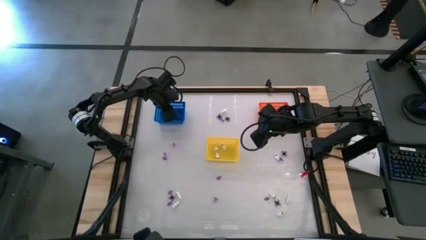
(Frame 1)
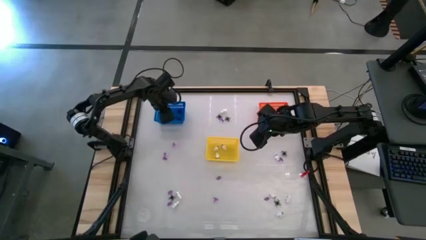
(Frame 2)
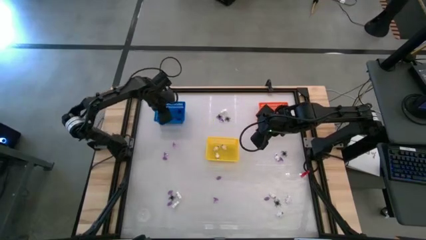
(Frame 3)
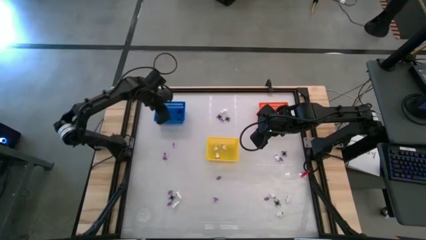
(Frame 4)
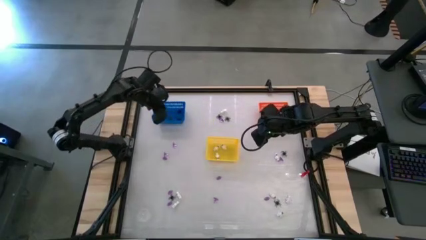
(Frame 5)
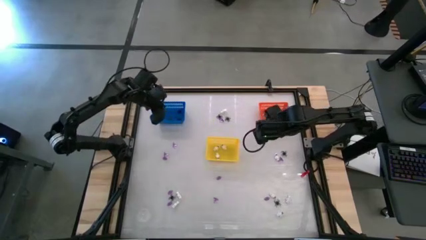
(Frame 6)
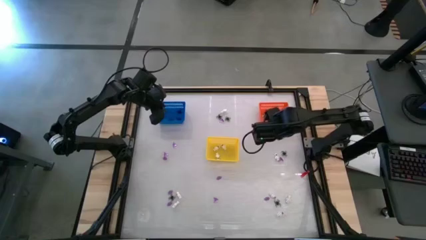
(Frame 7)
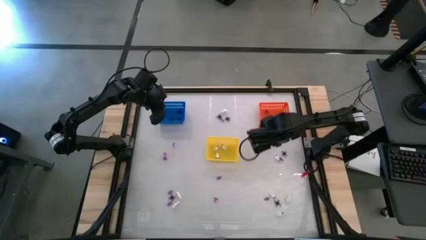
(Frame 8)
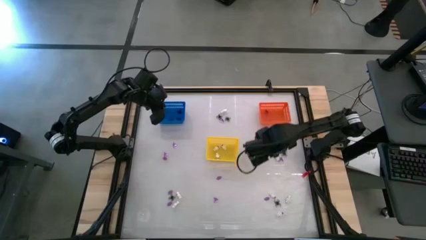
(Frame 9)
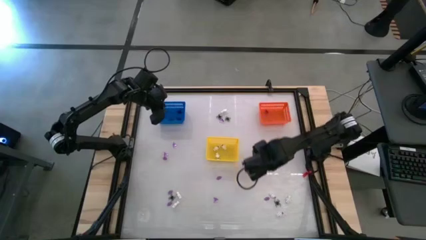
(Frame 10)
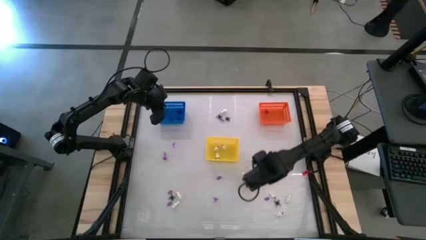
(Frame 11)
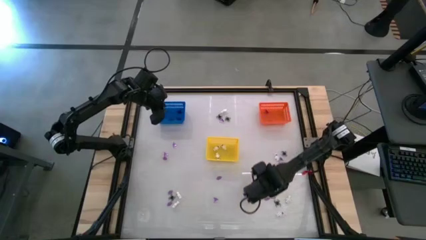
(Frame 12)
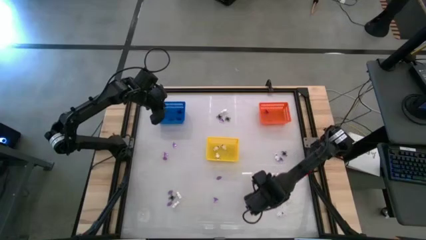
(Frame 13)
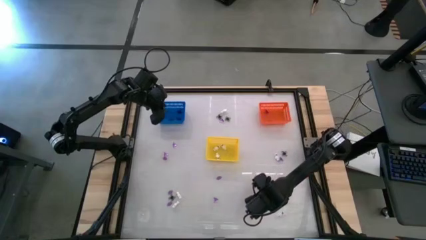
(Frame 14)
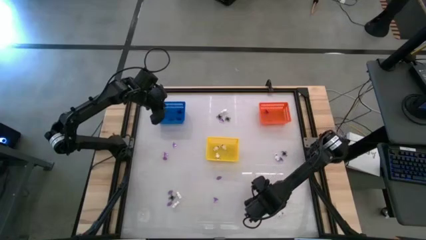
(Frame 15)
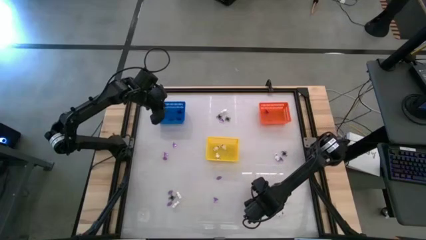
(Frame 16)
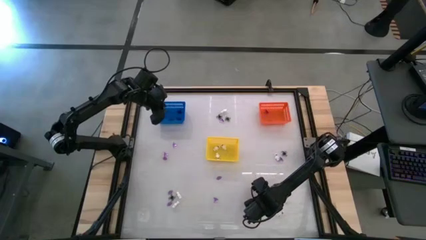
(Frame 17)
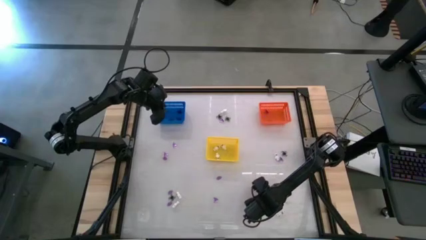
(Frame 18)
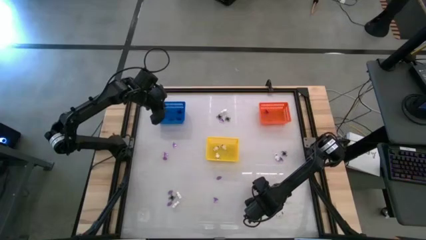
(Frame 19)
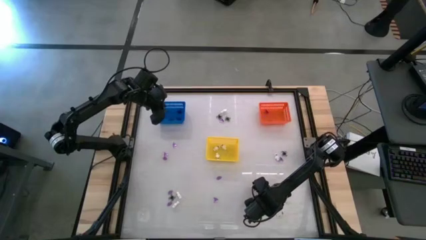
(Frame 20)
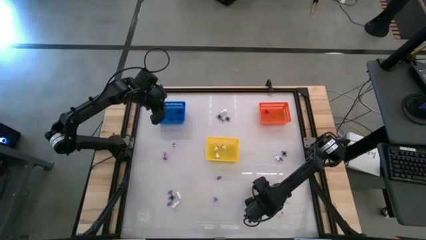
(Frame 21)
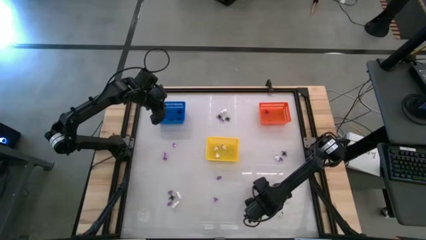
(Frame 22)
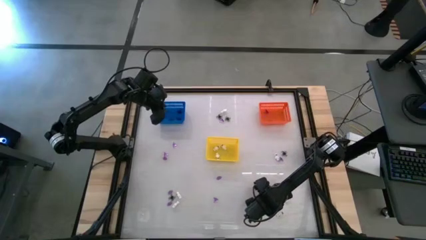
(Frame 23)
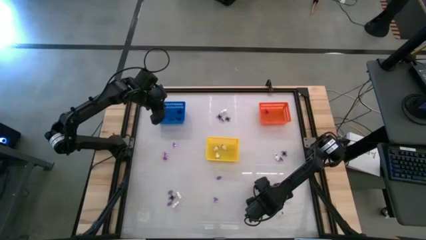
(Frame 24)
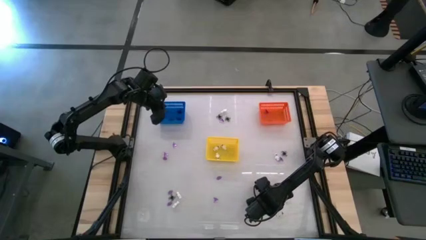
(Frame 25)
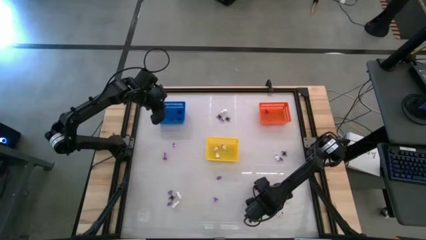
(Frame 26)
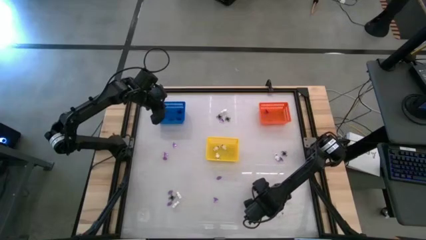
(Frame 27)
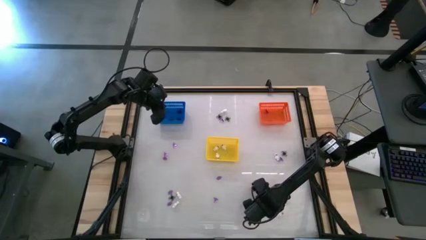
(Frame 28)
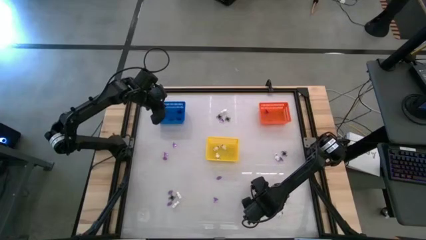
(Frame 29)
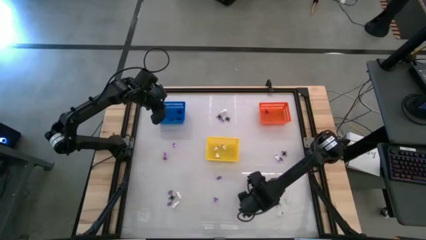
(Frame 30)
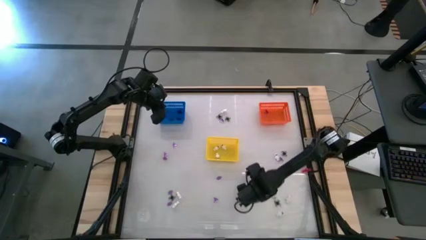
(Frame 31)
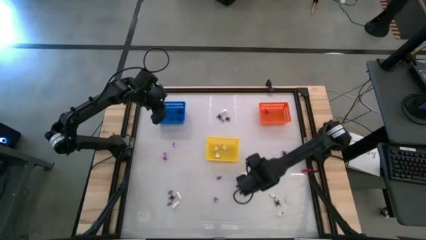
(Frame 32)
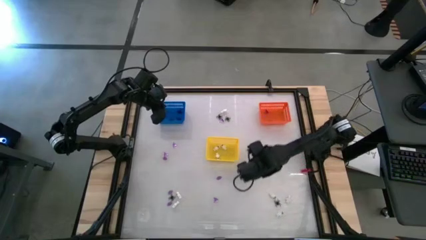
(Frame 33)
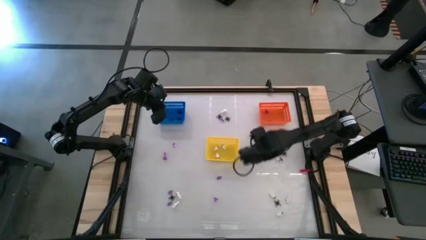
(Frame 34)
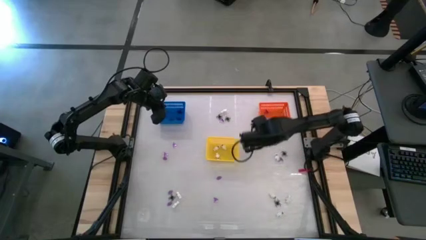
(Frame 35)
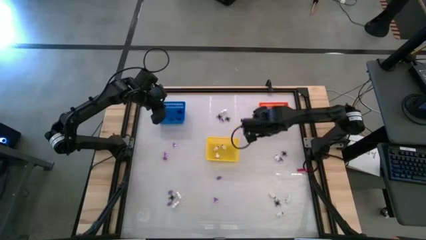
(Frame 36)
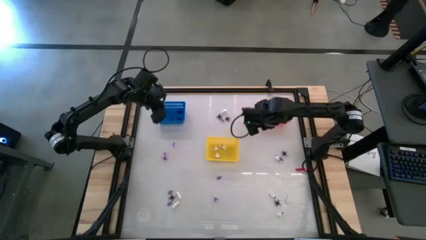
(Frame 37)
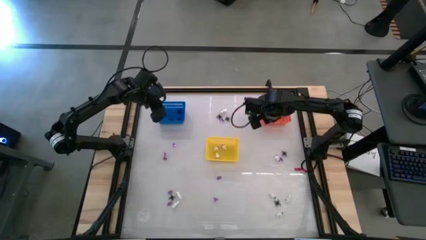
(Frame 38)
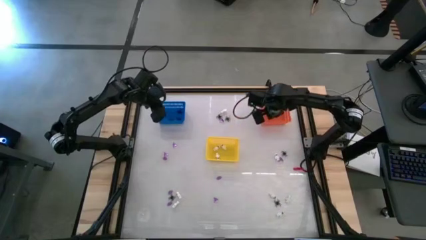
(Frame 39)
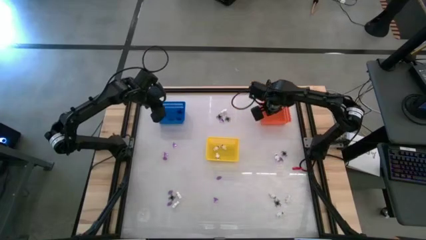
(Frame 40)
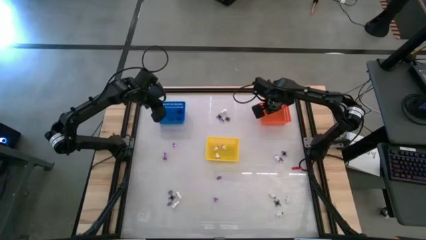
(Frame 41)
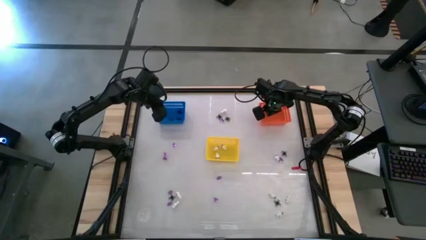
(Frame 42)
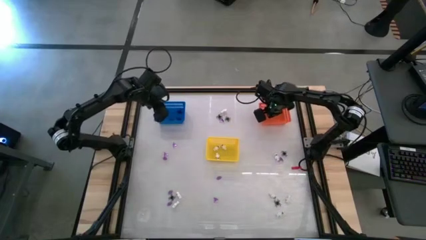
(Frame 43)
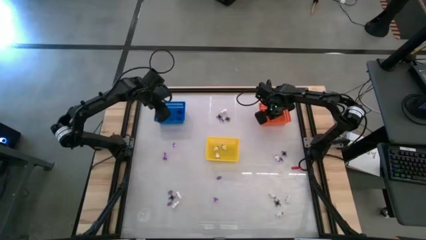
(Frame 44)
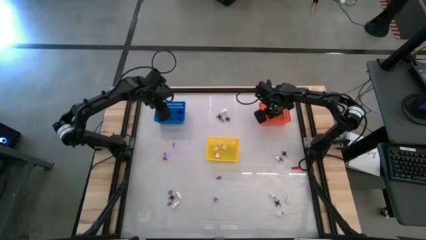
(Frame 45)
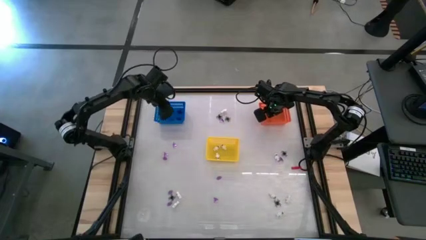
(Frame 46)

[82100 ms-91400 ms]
Task: Sort Halloween decoration
Put the purple witch hat toy into the orange bin

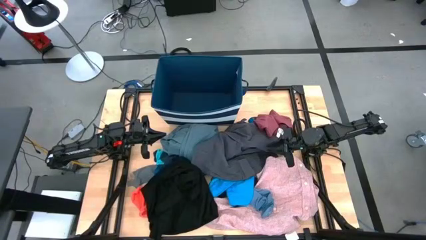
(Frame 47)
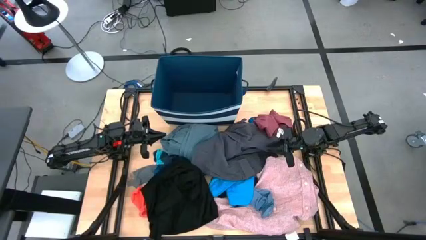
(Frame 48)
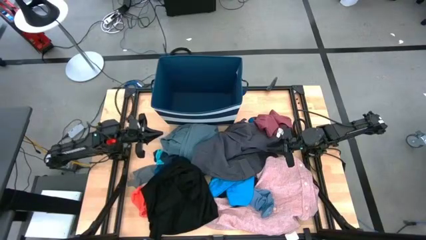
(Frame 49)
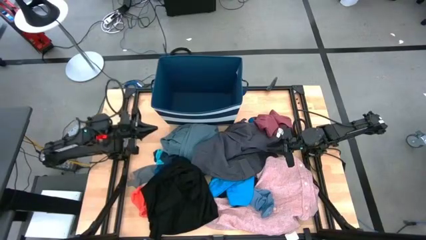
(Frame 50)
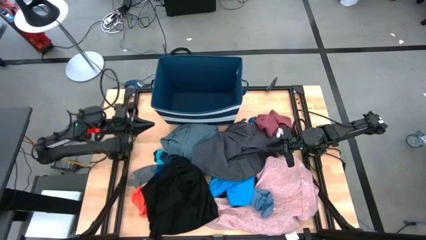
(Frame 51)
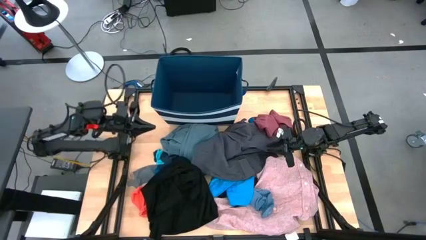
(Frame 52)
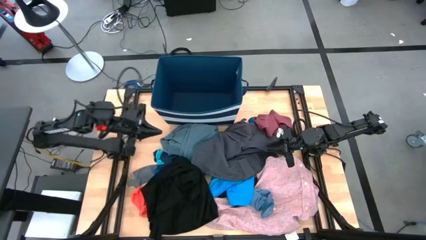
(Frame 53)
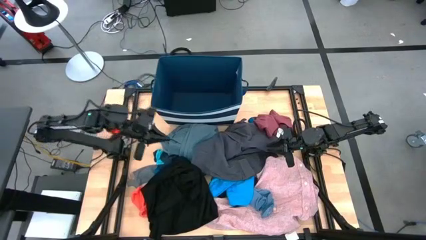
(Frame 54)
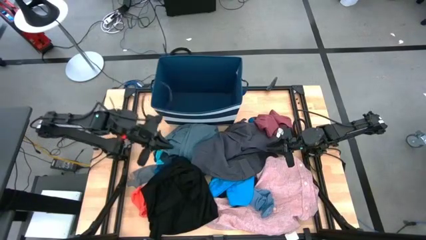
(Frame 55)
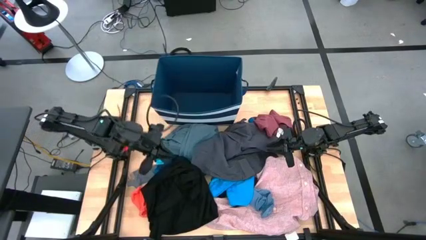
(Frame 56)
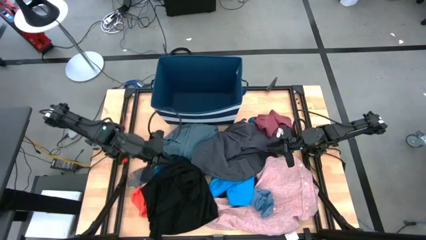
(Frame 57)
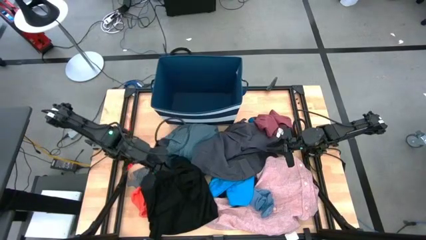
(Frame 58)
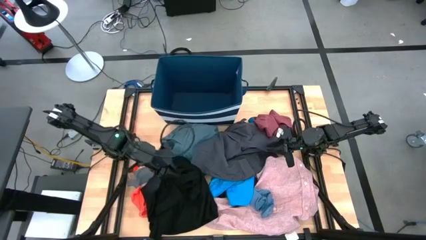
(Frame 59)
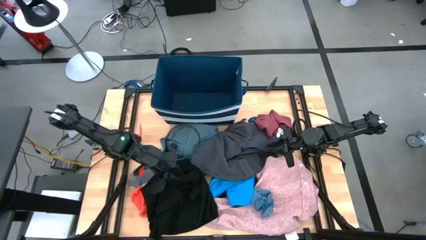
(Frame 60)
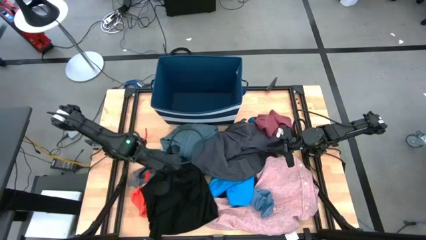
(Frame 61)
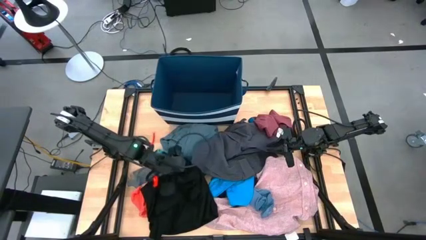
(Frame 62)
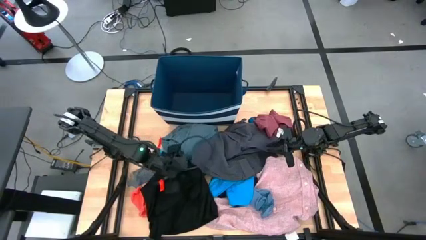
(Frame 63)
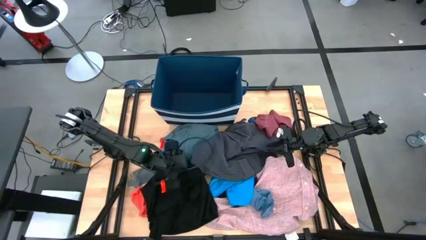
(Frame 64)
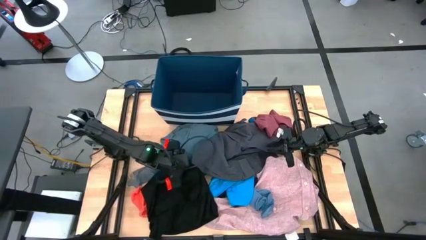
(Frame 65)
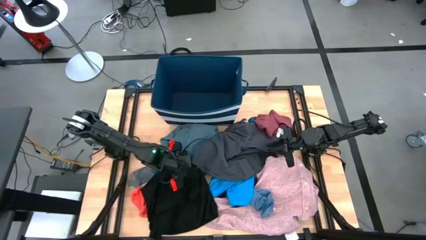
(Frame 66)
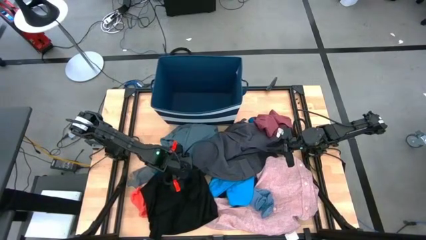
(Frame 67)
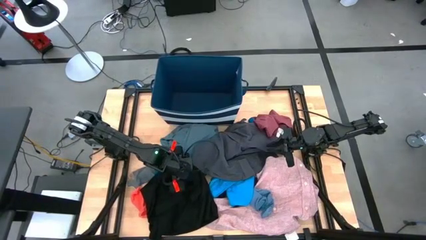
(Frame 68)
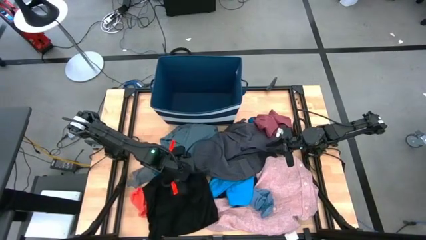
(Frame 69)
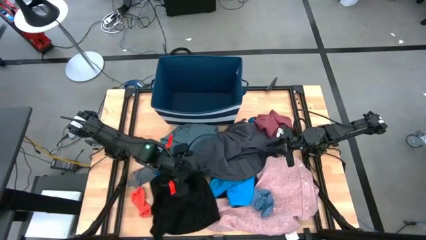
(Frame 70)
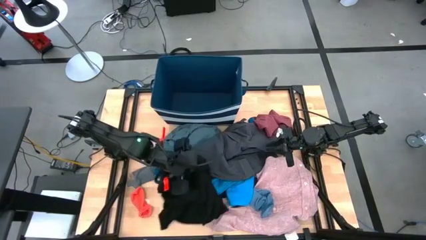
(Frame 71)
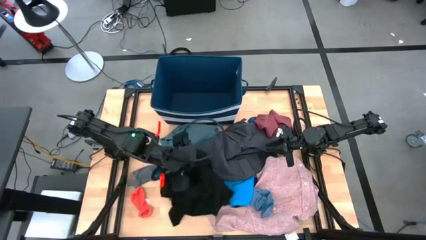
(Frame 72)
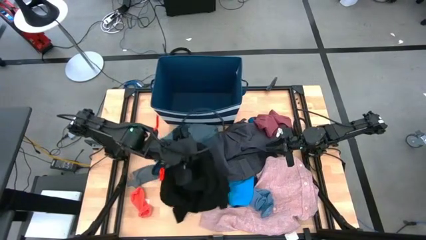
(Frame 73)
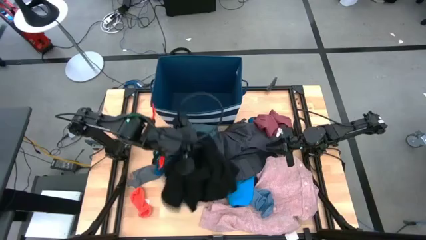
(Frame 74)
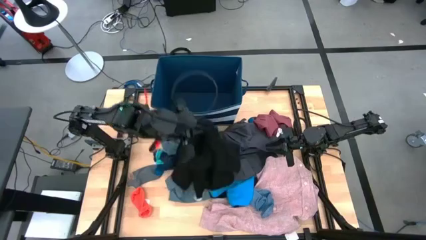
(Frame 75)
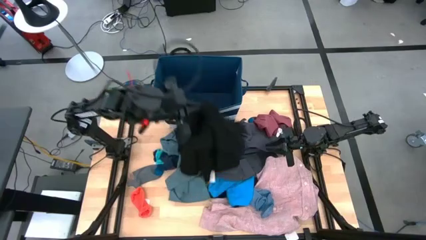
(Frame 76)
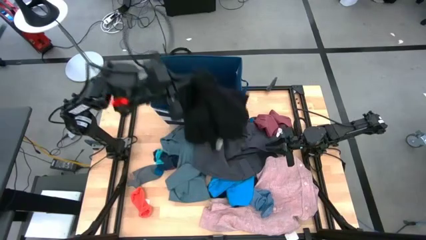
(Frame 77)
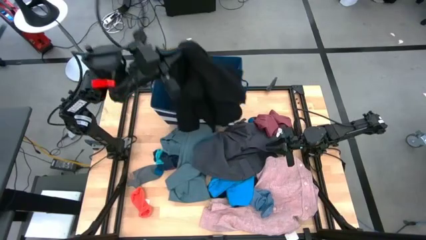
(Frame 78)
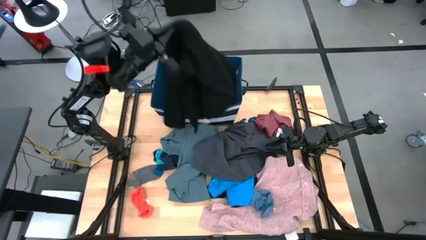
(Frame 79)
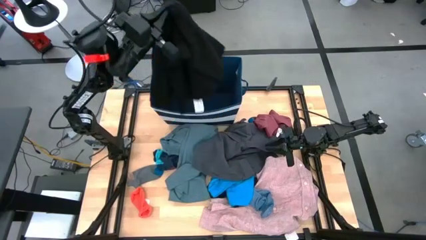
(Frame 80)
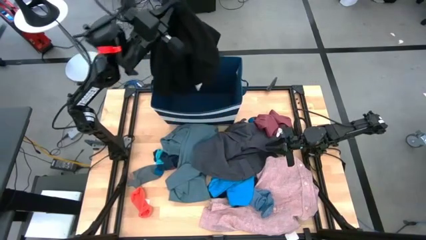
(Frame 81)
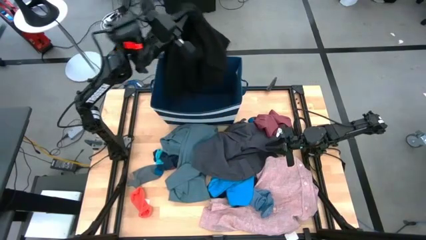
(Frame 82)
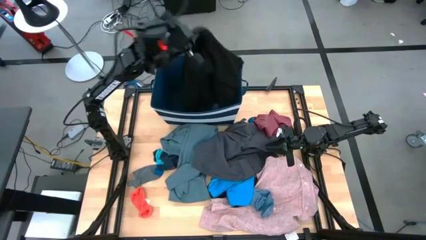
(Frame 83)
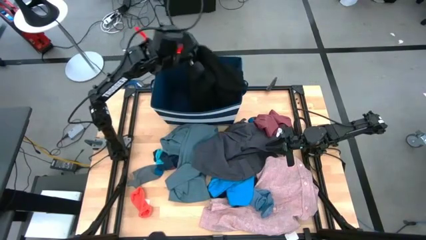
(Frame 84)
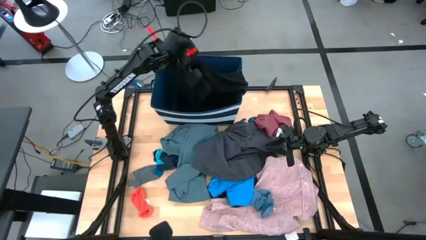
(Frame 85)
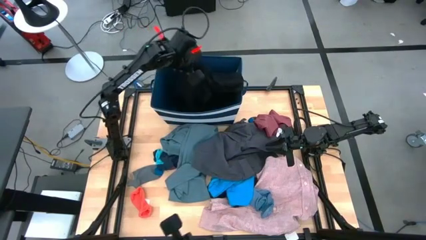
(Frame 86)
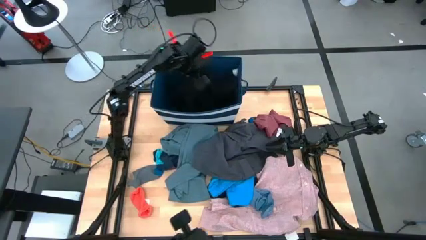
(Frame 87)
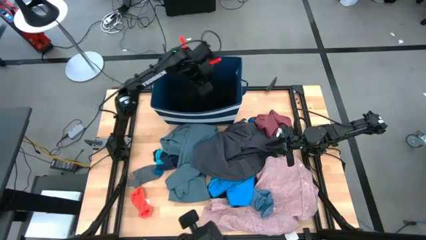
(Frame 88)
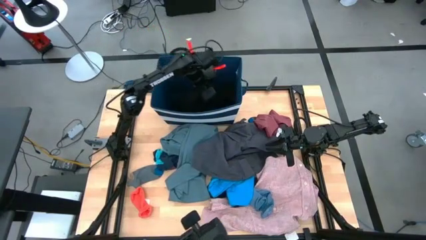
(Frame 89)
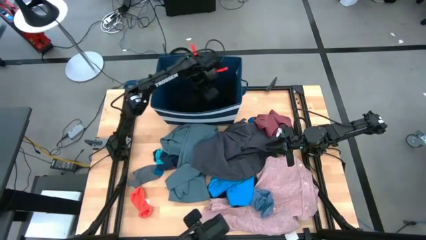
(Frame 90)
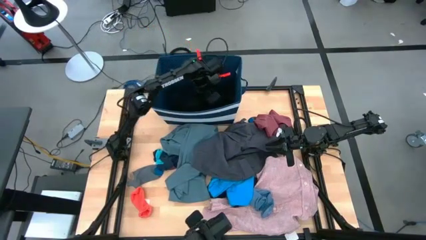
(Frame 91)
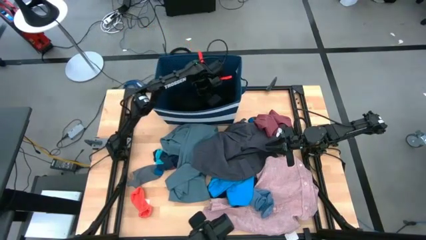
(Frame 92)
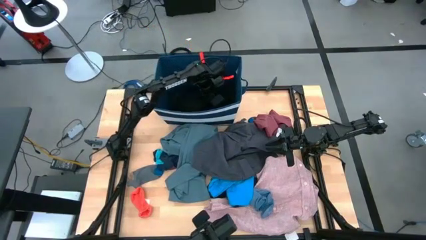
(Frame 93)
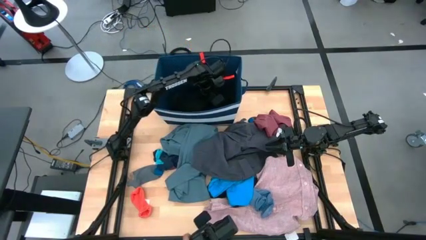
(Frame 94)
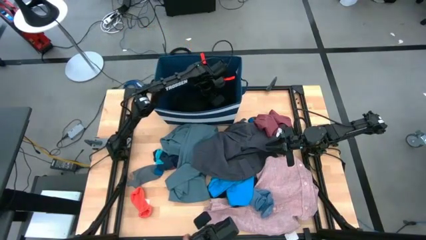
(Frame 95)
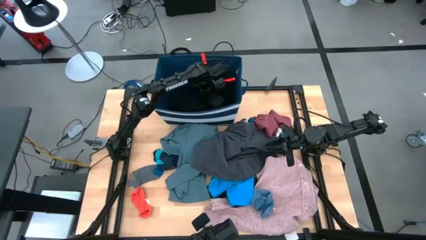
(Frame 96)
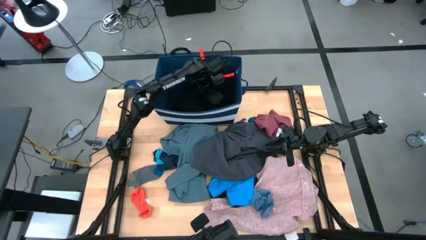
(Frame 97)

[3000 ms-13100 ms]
Task: Sort clothes
Put the black shirt into the blue bin
